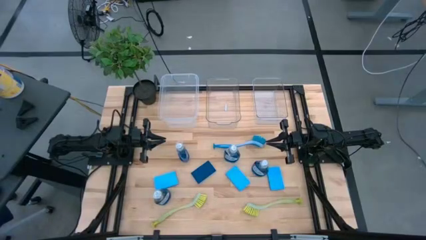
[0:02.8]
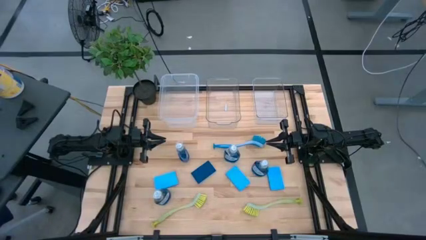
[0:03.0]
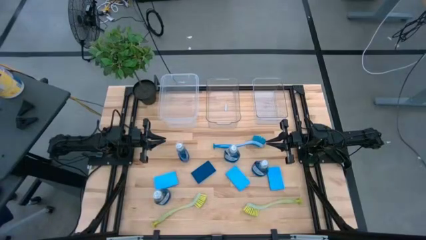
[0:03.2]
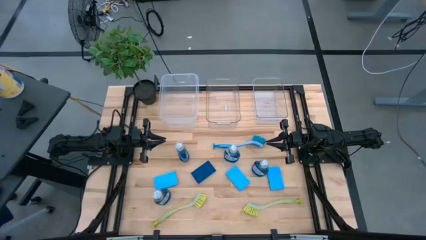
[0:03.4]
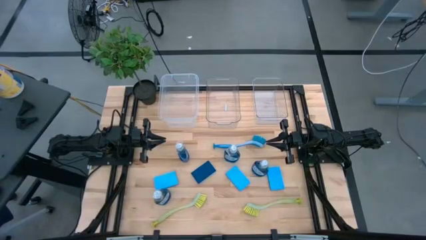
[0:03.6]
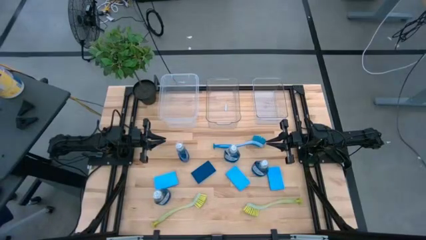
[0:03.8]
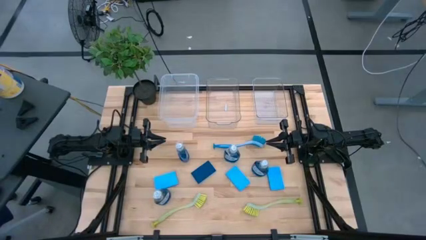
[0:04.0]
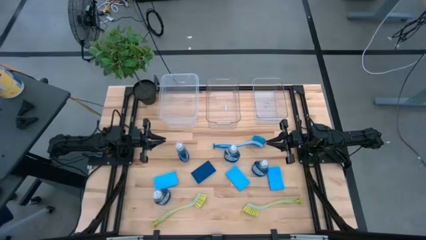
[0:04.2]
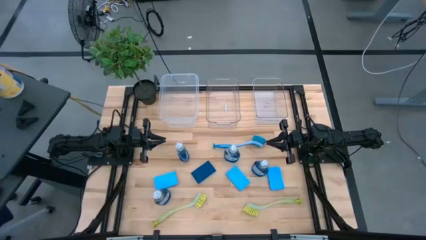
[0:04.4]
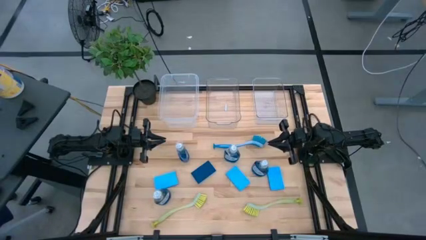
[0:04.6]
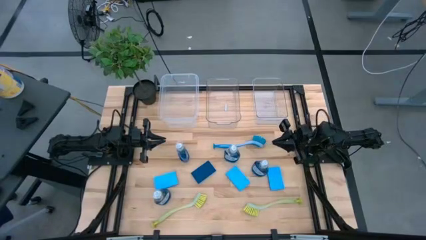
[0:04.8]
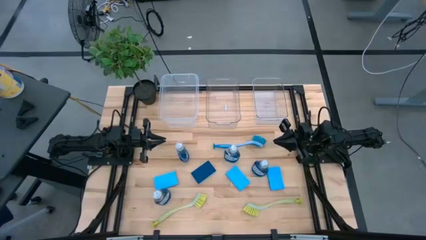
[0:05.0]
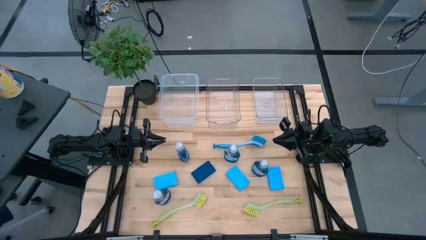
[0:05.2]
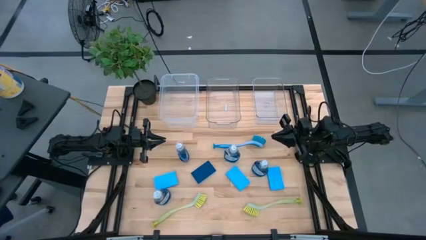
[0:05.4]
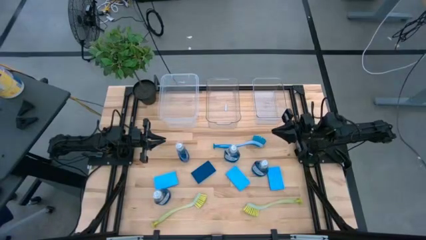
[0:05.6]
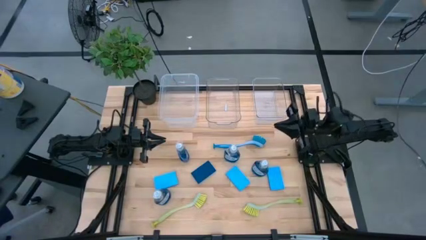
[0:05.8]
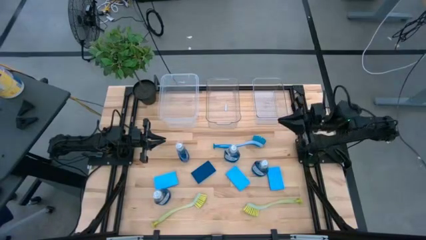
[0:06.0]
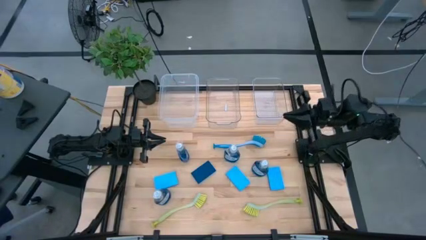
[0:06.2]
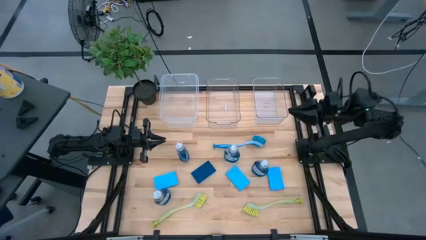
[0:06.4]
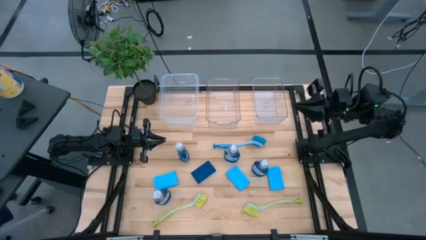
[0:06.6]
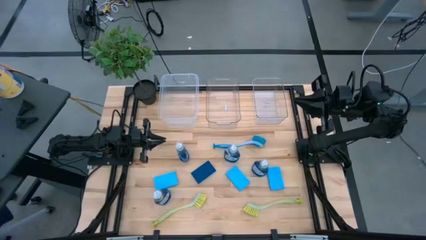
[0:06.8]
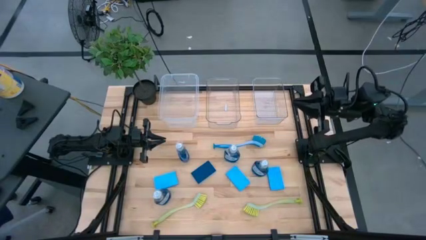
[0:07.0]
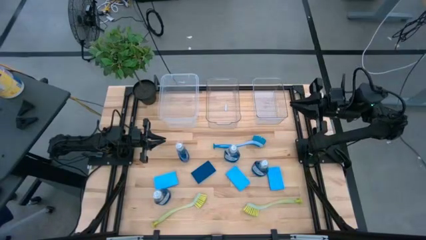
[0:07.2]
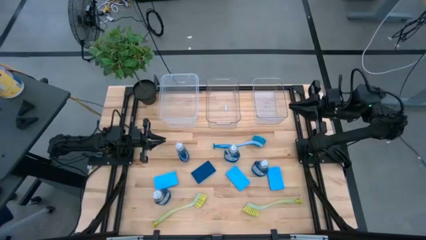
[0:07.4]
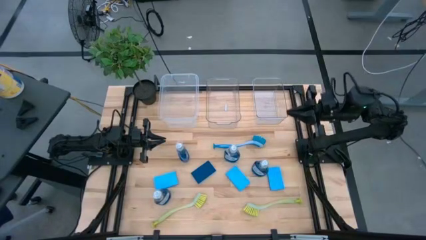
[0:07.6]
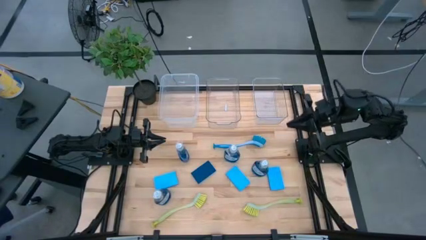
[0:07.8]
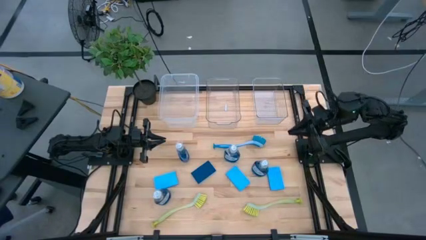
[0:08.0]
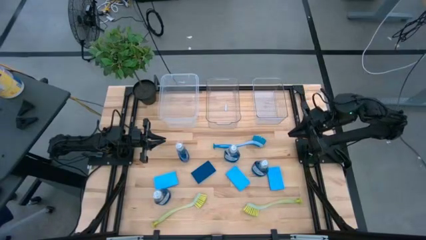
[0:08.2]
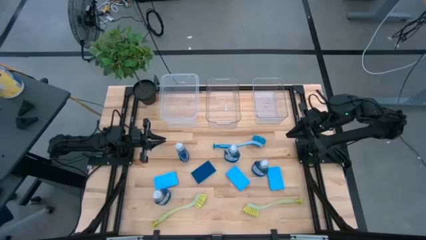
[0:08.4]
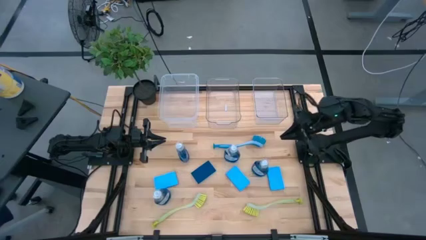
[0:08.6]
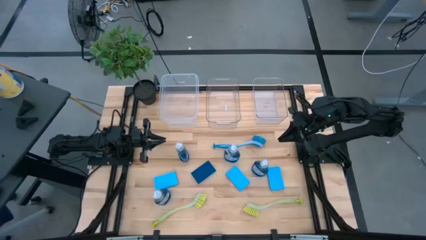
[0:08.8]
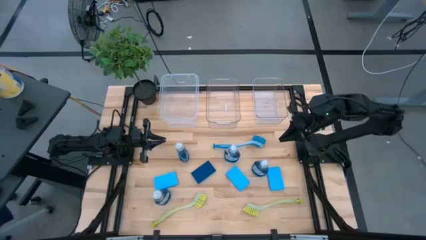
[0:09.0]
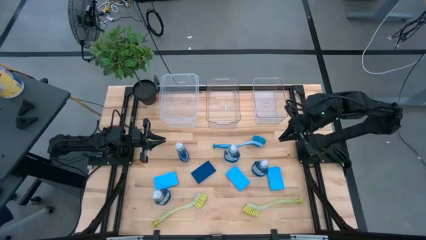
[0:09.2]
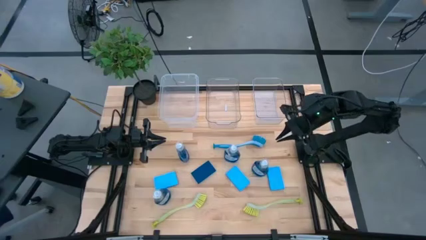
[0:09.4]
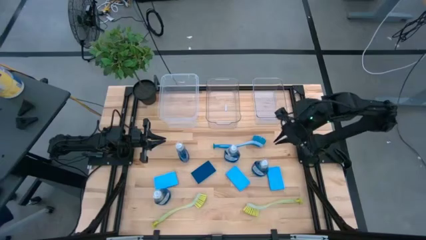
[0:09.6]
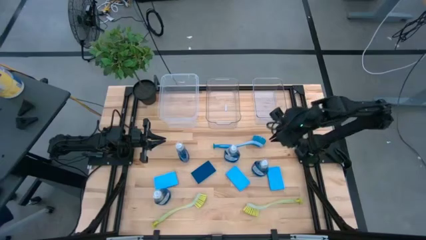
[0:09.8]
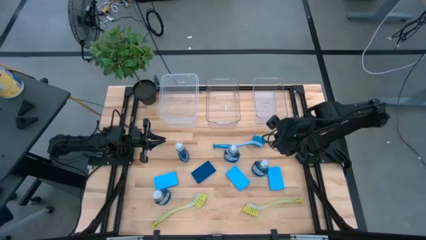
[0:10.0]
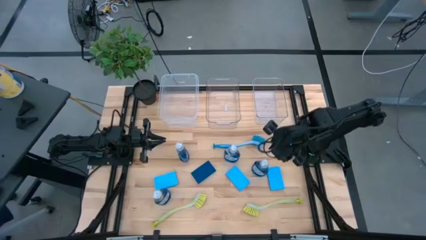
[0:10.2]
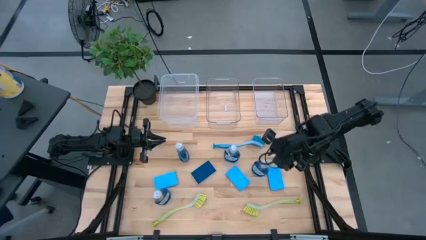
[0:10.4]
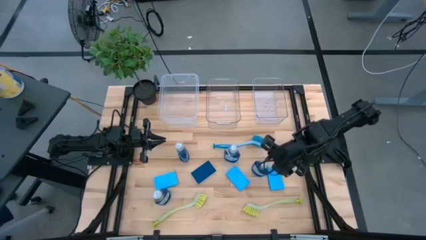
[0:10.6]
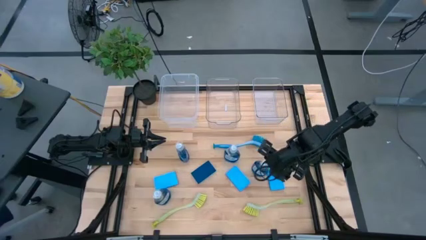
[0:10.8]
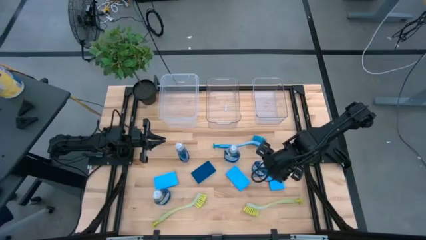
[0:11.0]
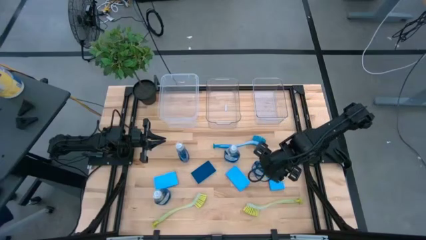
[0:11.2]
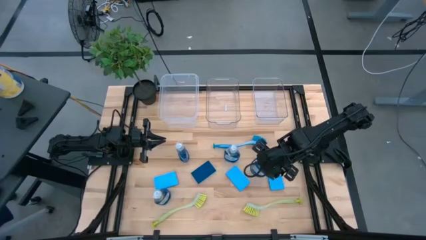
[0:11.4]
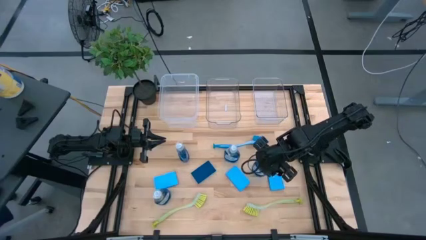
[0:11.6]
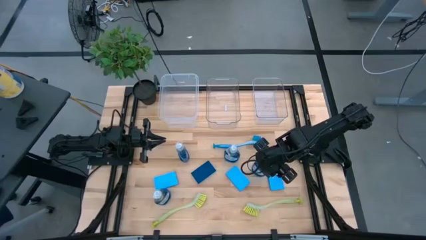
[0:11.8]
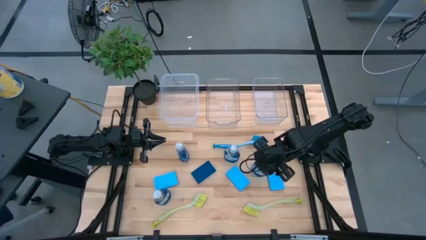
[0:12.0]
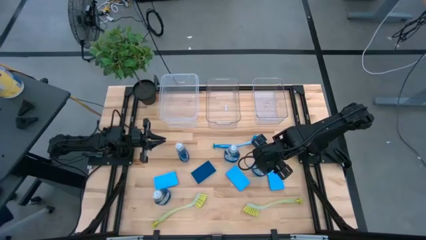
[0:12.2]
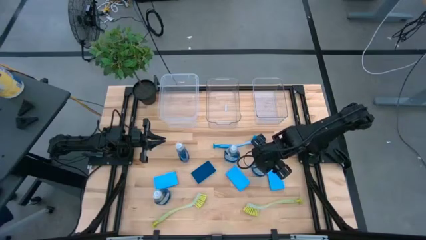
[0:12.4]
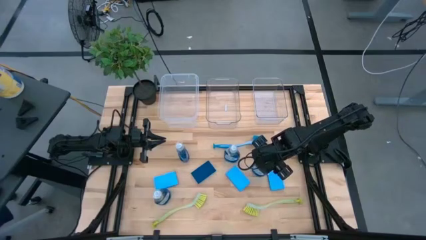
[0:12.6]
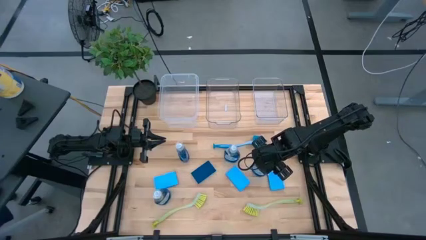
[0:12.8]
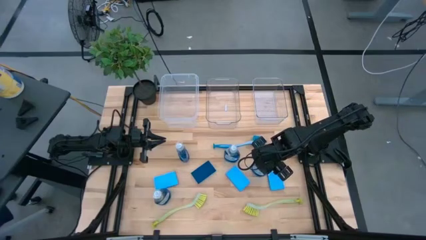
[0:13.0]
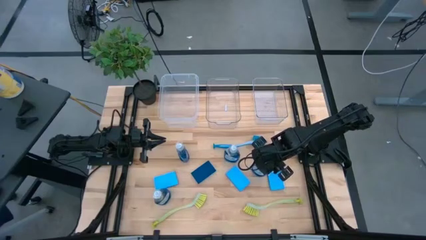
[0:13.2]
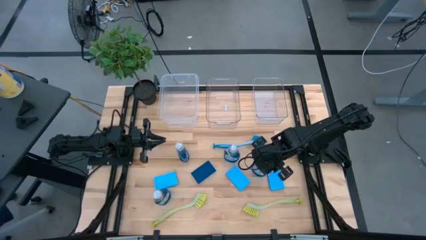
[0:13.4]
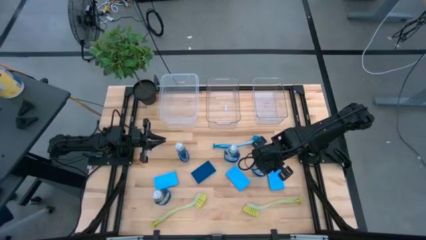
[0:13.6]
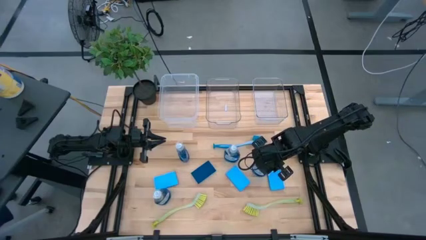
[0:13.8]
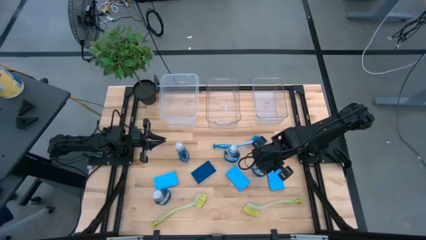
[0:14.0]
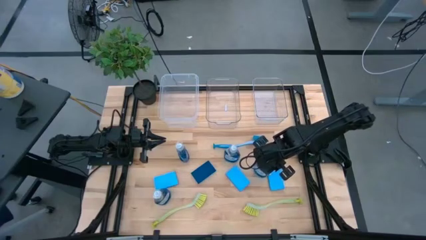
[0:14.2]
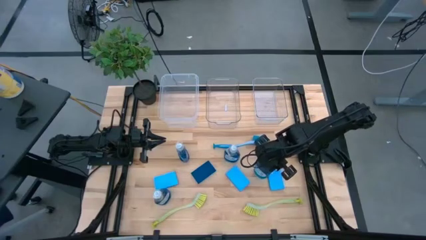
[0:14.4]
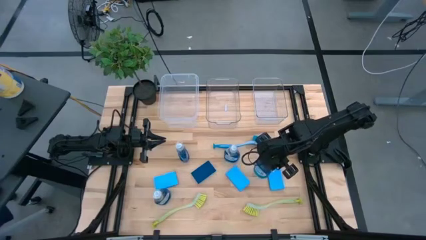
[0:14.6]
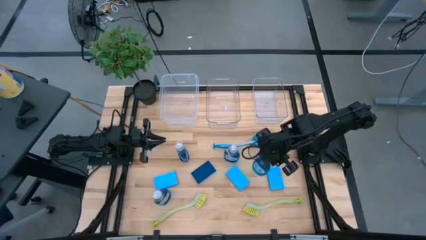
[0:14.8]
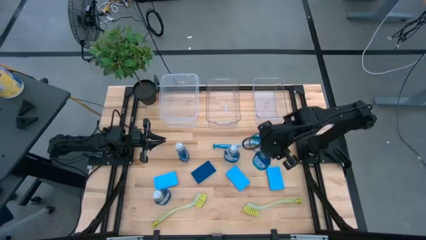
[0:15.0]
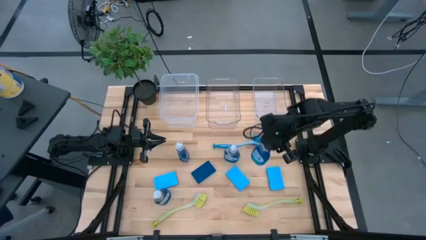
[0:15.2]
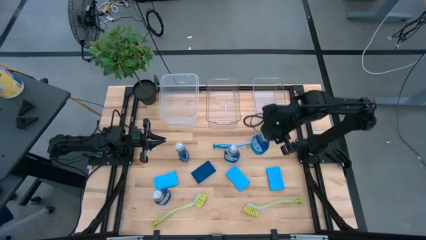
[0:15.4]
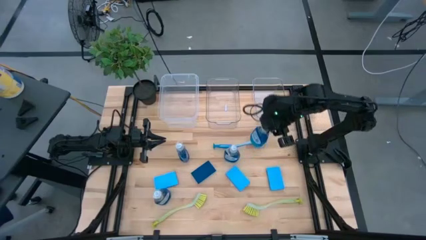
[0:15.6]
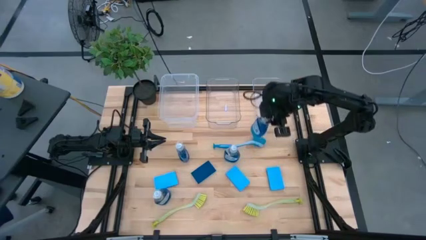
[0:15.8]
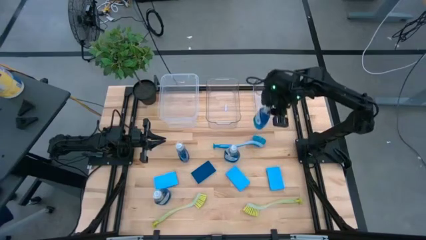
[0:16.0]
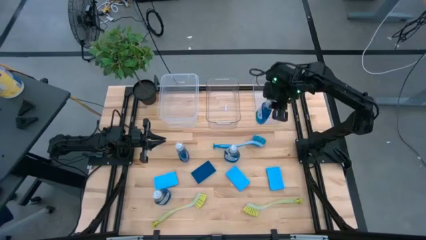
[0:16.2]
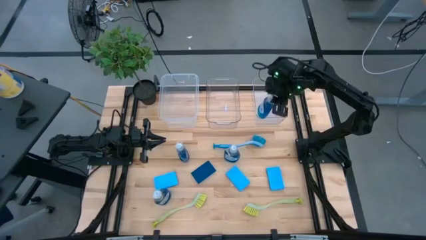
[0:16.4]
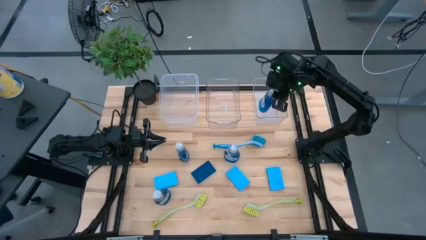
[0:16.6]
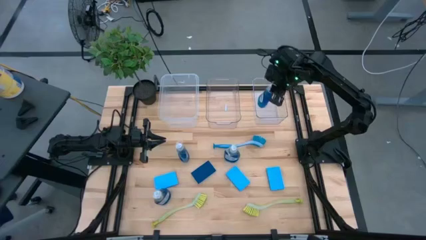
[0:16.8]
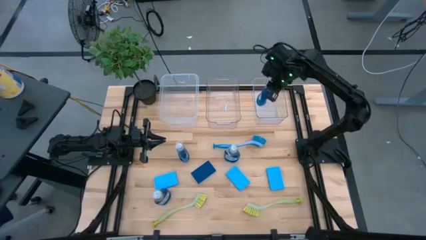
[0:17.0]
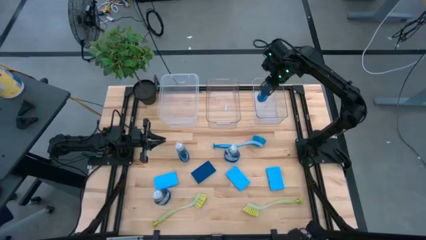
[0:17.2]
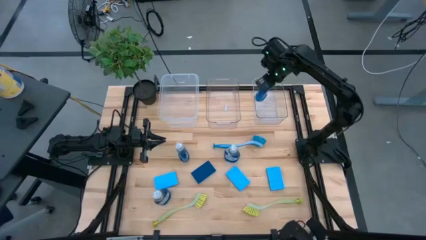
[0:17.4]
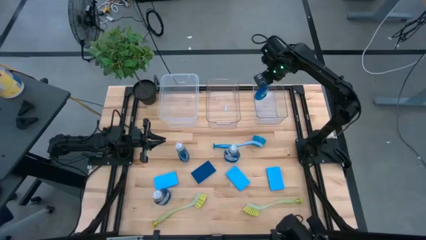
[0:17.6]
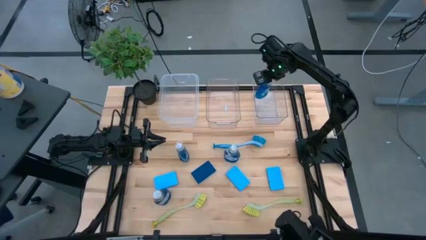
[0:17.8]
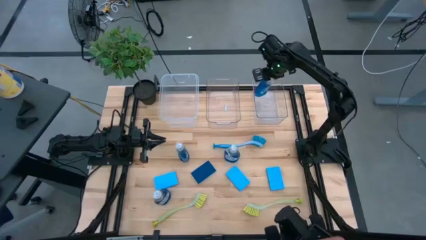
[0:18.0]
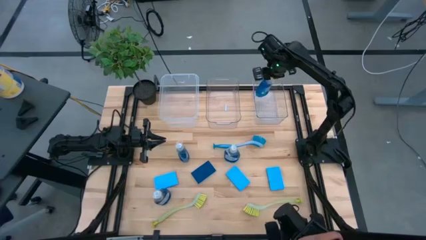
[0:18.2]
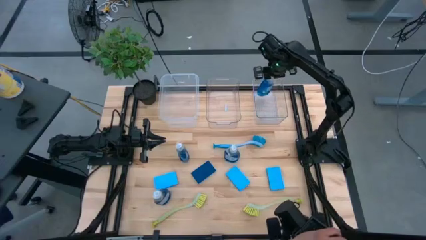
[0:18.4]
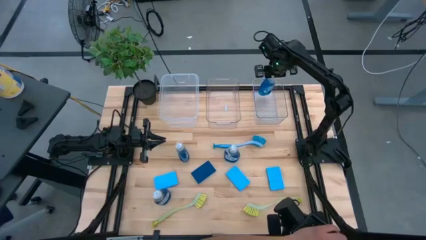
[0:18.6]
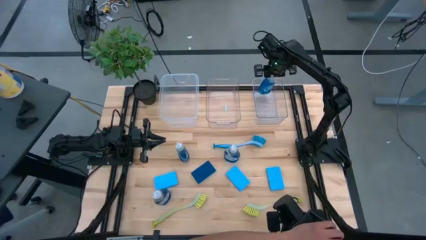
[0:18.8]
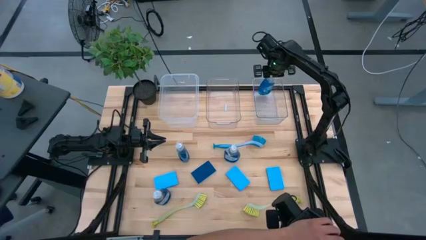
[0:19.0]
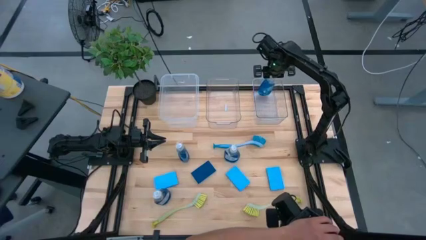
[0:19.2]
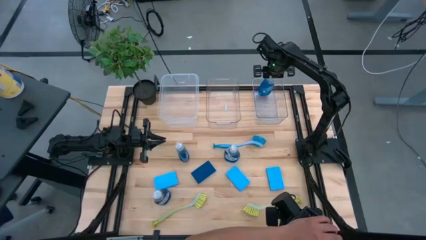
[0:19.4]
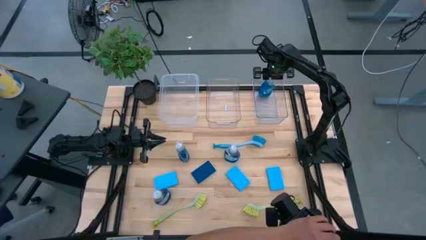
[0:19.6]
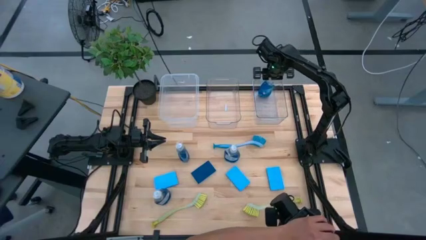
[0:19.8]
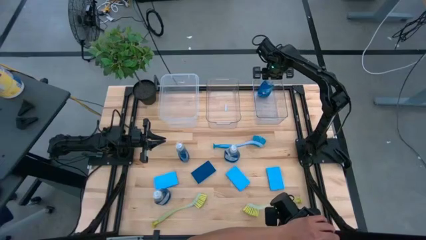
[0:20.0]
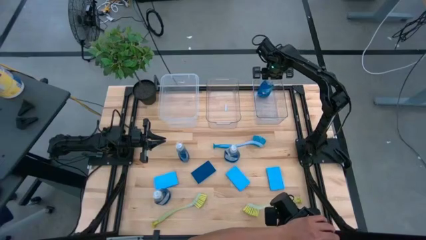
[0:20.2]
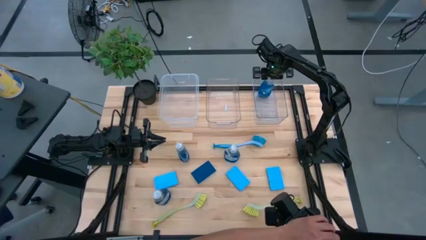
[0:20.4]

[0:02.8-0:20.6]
Task: Pick & Place Kitchen Sink Supplies
Put the blue detergent into the right transparent bin
